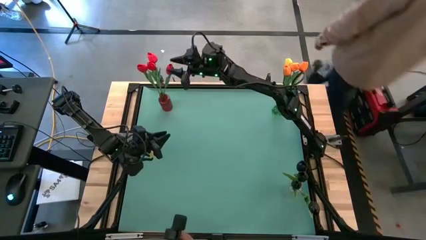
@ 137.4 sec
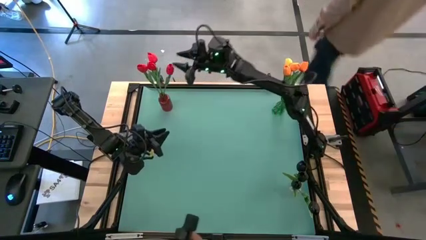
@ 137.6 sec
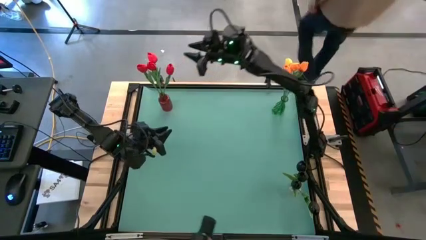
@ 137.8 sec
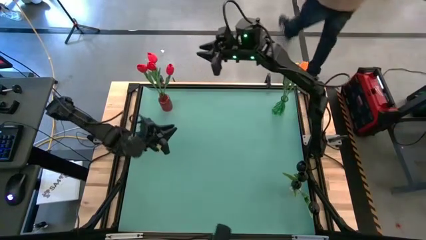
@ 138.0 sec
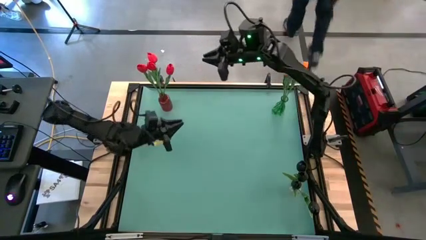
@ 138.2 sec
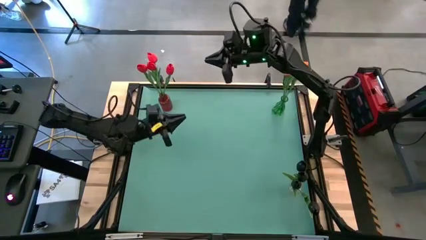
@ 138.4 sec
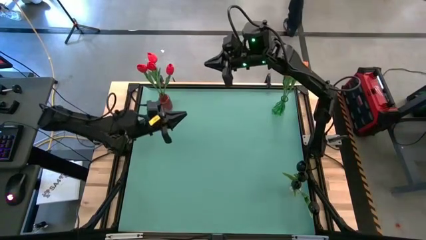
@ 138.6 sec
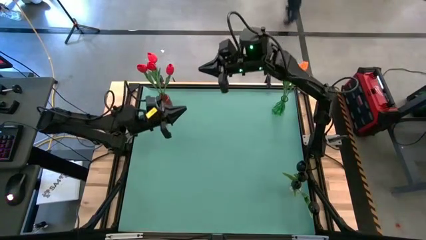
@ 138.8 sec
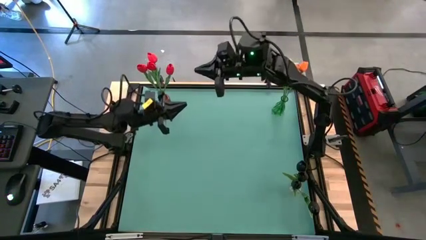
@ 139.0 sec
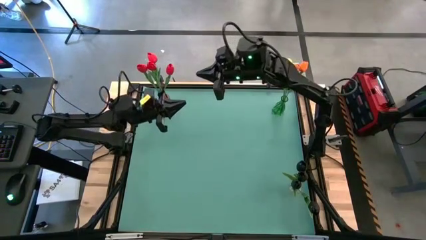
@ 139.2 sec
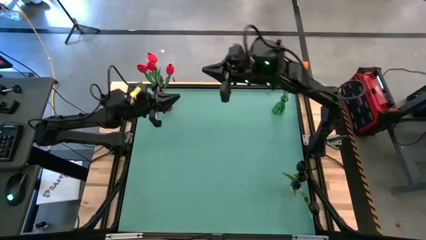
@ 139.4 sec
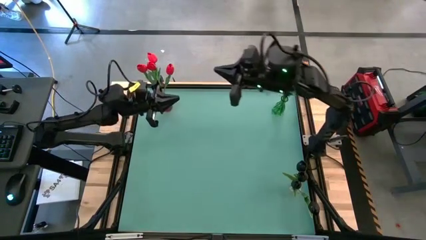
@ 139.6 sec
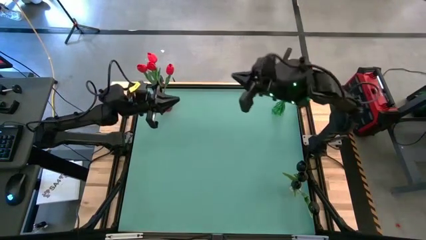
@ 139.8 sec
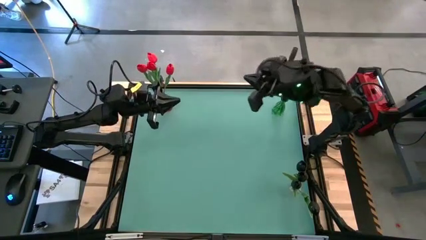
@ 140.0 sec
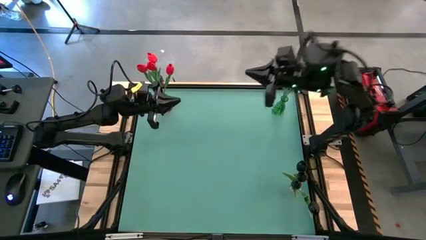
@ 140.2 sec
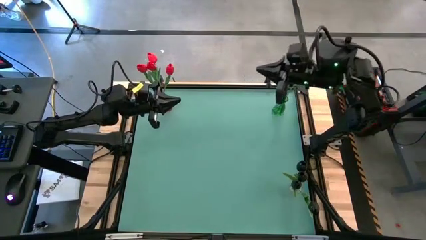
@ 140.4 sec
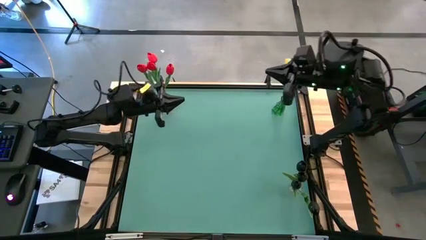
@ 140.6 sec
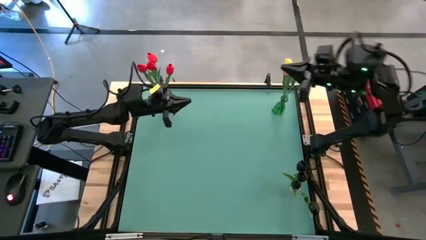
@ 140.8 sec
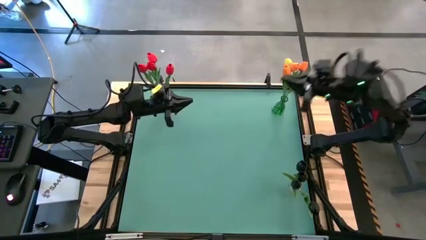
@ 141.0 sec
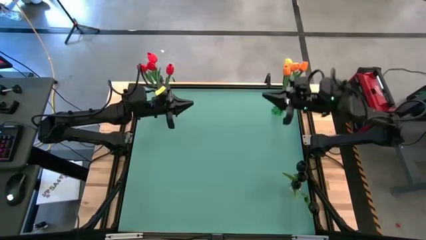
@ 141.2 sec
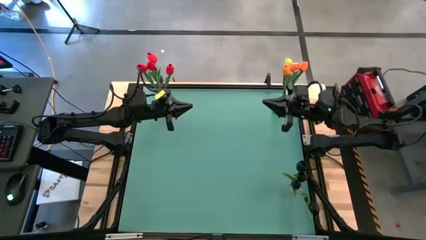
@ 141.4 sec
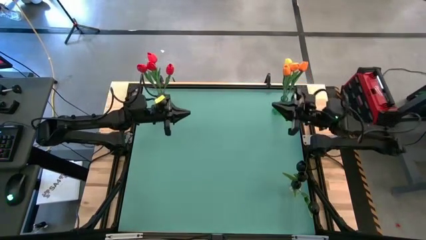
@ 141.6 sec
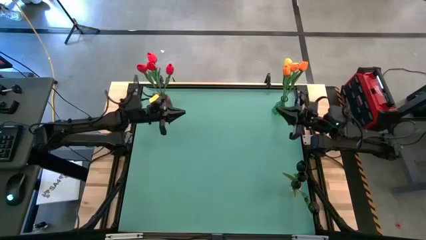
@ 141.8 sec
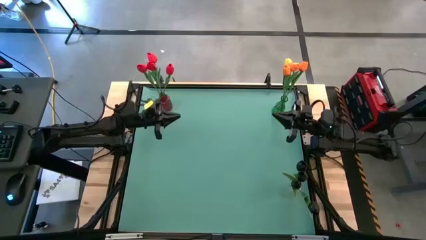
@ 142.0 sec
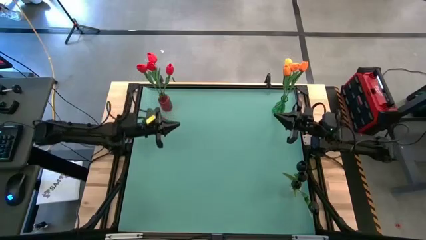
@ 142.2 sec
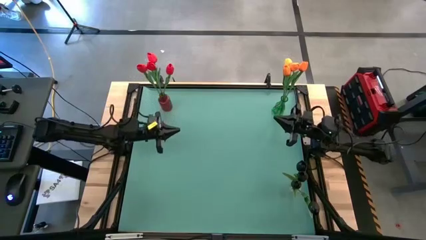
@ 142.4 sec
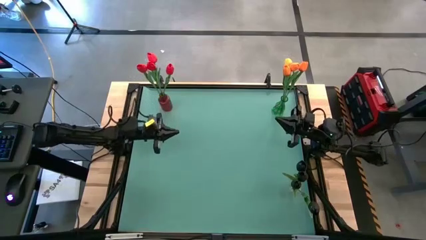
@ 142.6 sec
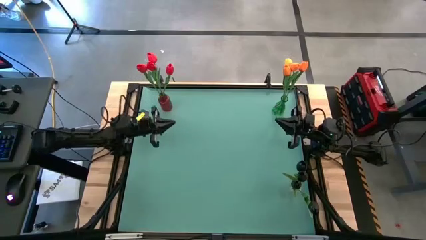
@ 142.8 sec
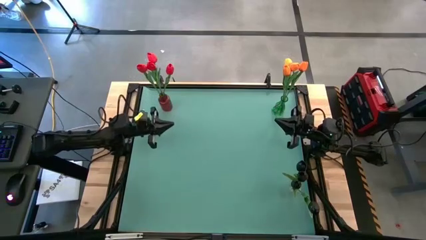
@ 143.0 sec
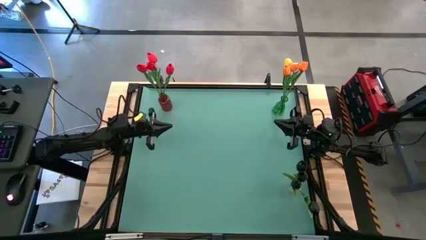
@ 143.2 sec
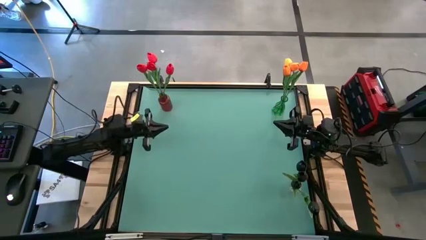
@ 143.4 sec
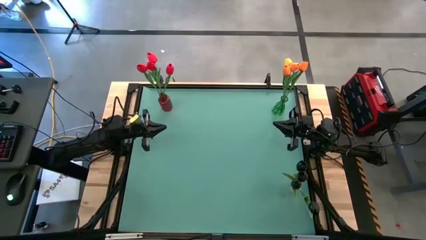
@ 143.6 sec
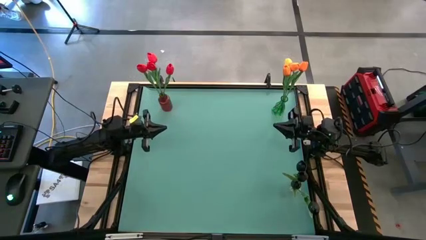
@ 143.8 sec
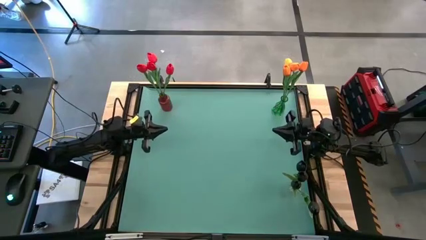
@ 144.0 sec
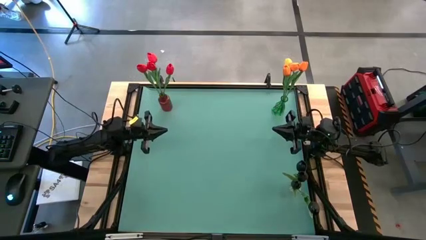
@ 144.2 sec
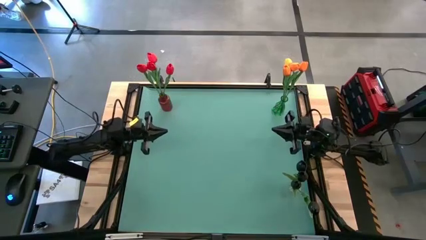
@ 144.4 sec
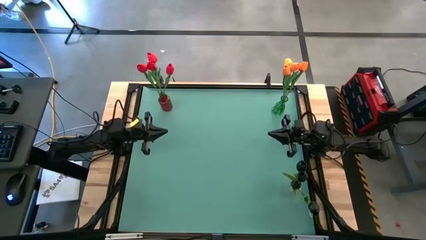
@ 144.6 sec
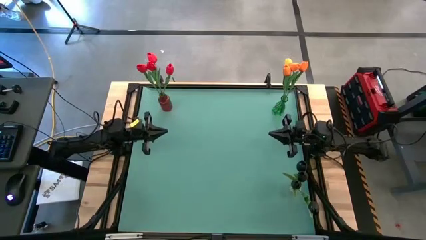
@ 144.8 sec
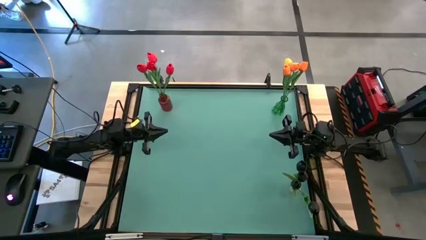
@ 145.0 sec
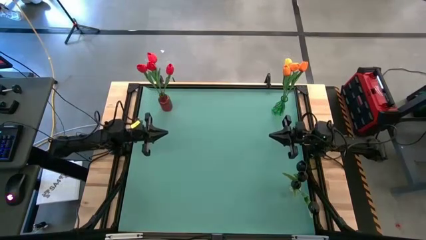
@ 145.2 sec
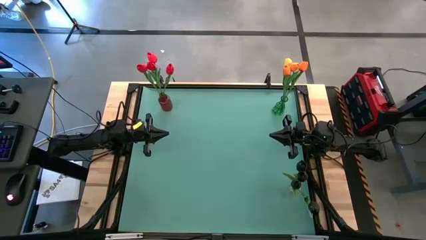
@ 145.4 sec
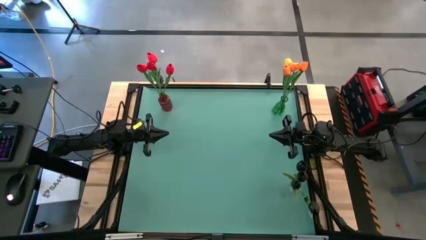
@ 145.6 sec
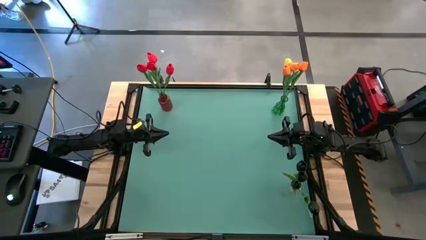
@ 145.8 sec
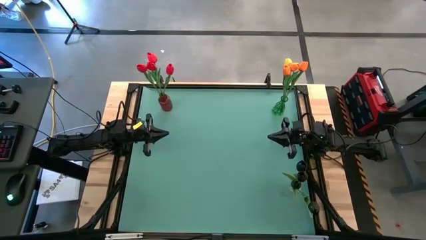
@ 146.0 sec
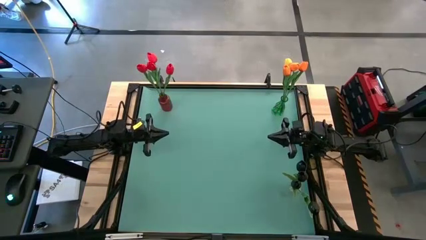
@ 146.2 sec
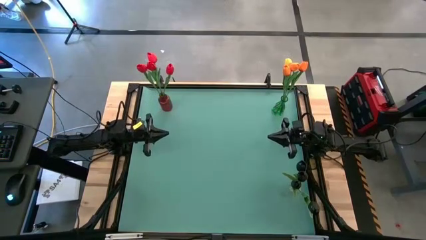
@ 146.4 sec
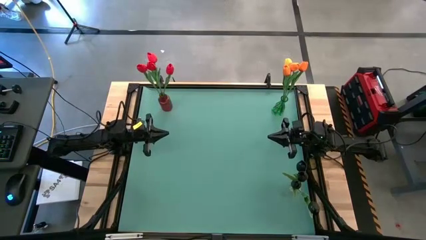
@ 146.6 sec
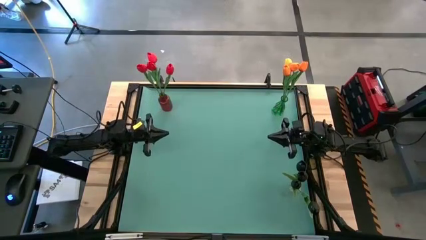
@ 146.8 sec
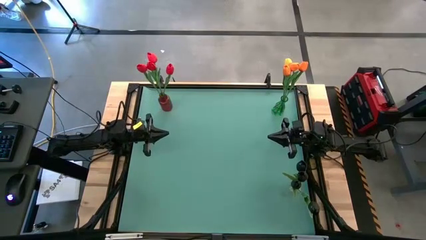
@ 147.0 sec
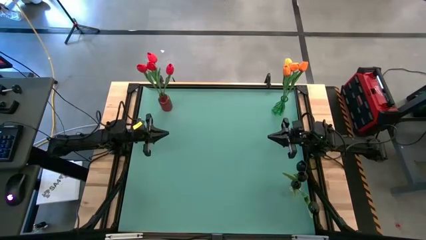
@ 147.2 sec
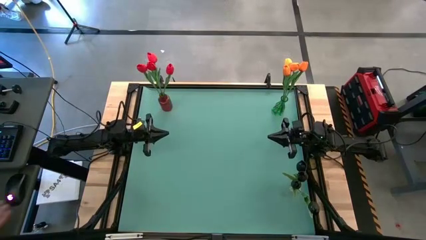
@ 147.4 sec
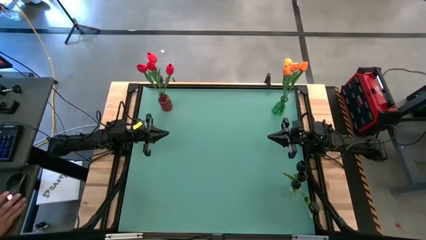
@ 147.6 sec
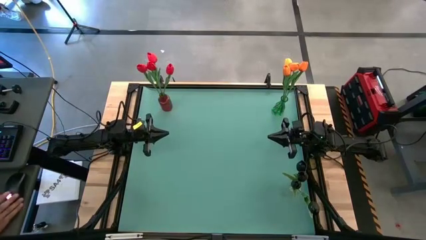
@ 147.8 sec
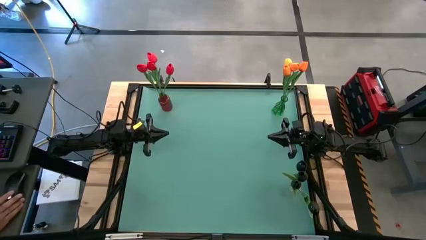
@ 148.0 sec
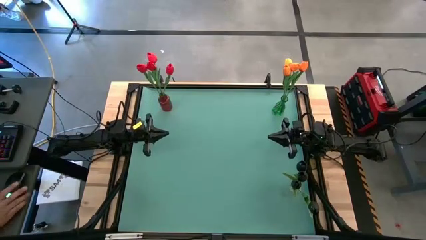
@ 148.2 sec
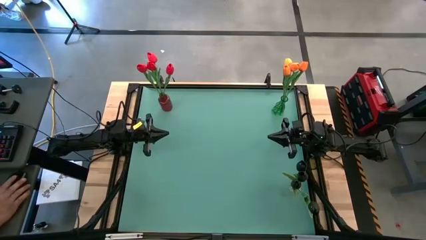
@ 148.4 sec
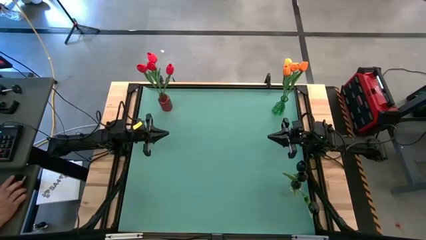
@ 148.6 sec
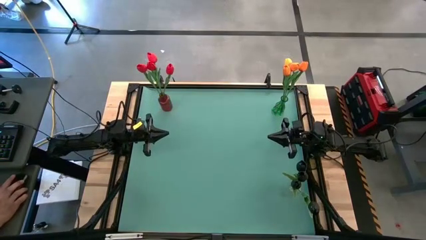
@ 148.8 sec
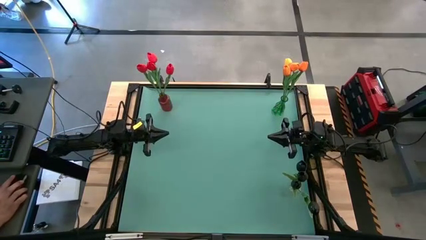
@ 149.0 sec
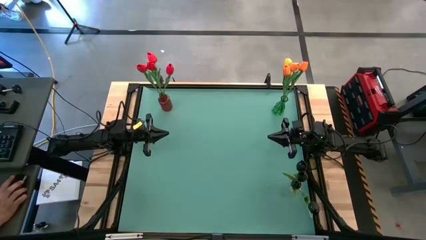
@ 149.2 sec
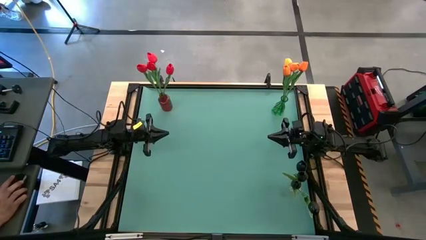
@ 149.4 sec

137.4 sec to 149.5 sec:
Task: Sort flowers into vase by color
Return to Home Position

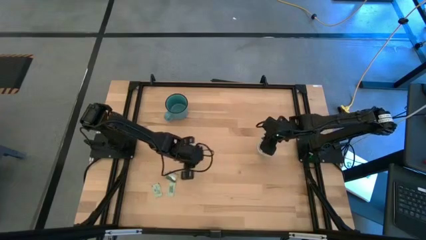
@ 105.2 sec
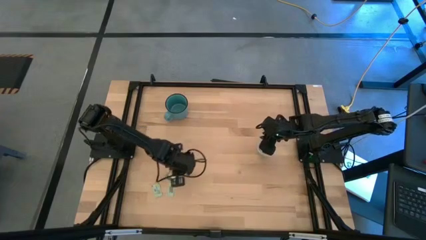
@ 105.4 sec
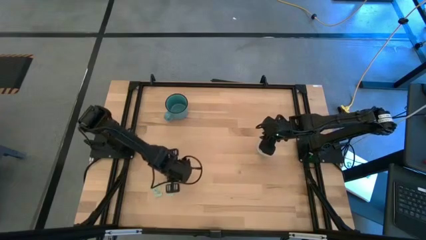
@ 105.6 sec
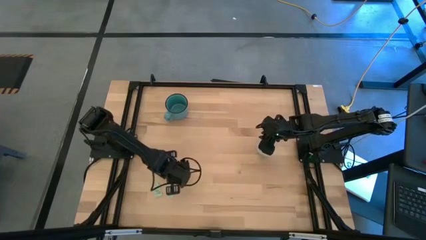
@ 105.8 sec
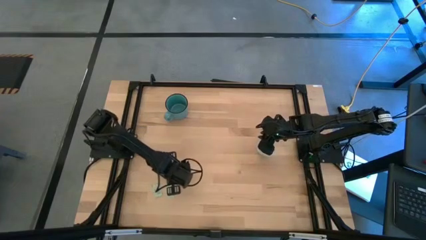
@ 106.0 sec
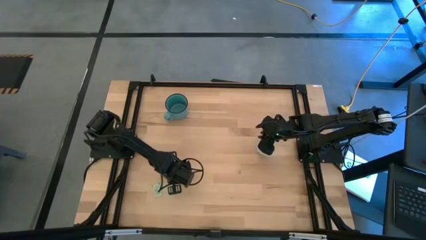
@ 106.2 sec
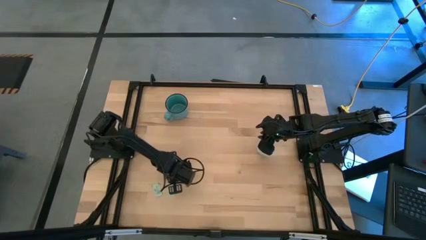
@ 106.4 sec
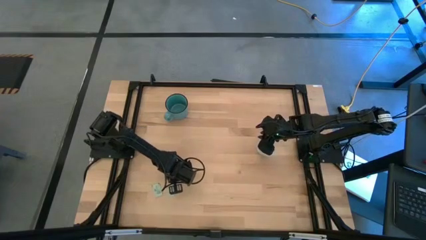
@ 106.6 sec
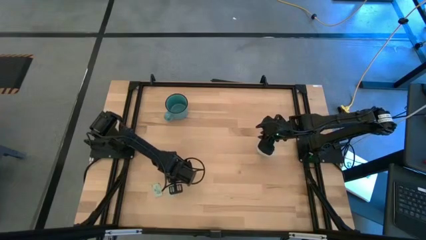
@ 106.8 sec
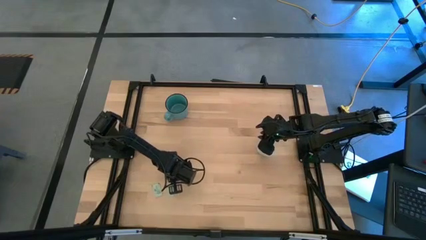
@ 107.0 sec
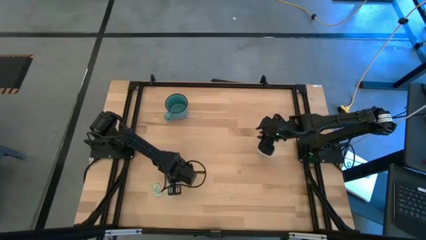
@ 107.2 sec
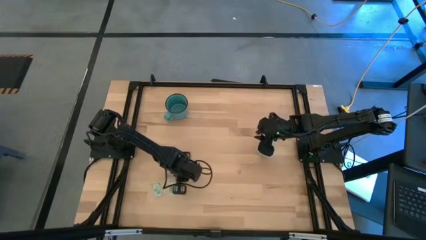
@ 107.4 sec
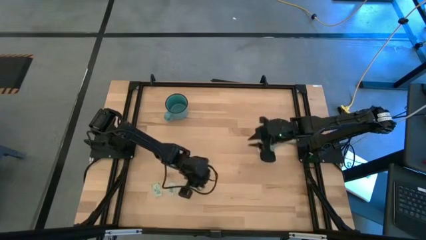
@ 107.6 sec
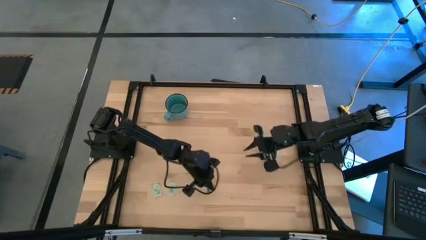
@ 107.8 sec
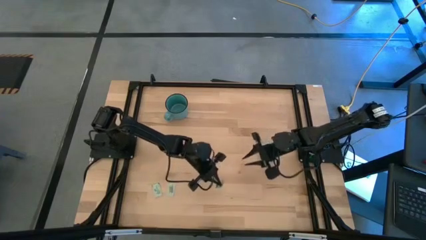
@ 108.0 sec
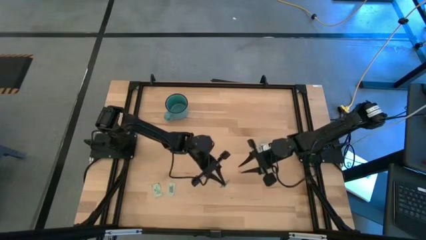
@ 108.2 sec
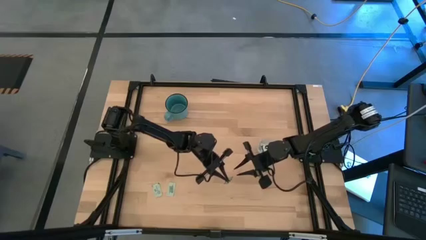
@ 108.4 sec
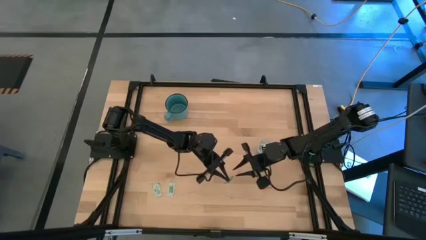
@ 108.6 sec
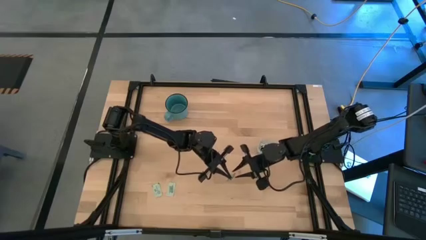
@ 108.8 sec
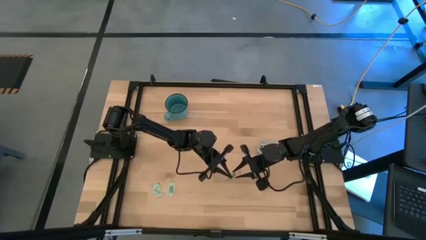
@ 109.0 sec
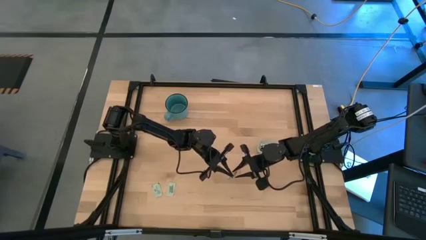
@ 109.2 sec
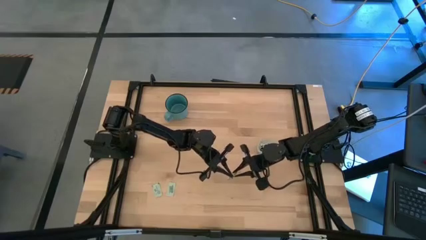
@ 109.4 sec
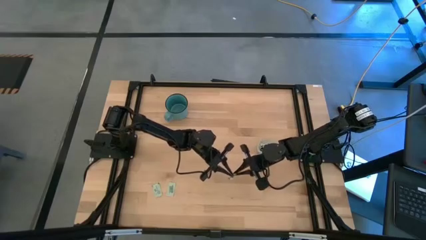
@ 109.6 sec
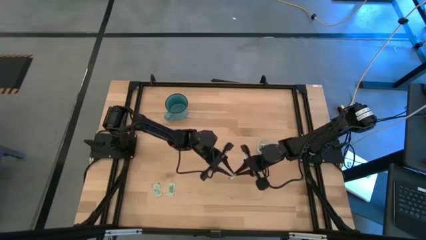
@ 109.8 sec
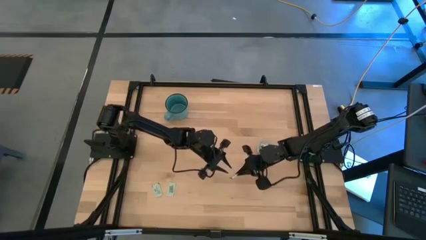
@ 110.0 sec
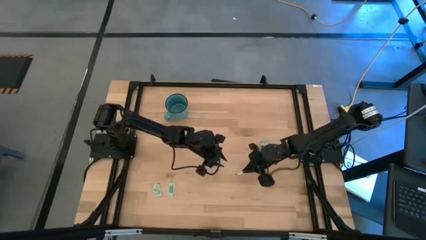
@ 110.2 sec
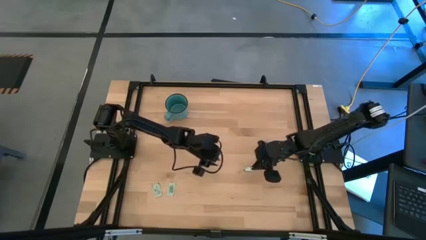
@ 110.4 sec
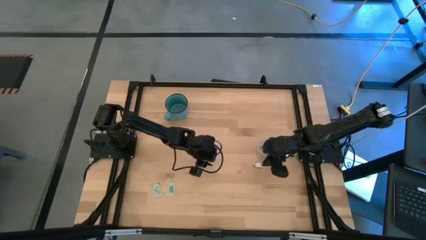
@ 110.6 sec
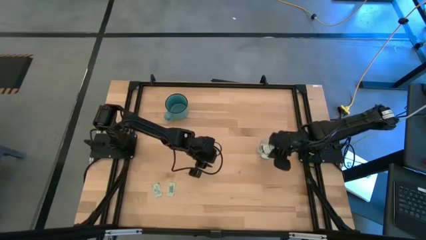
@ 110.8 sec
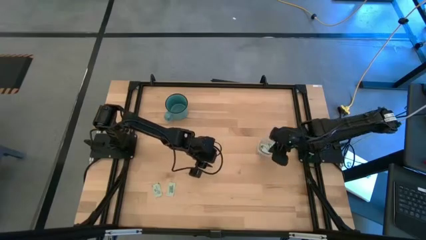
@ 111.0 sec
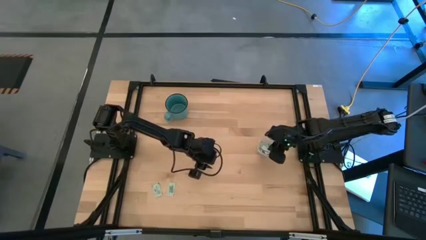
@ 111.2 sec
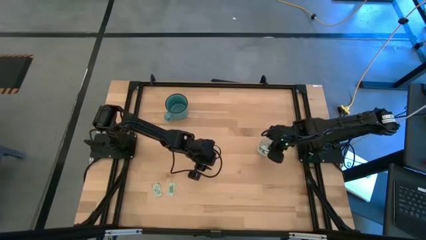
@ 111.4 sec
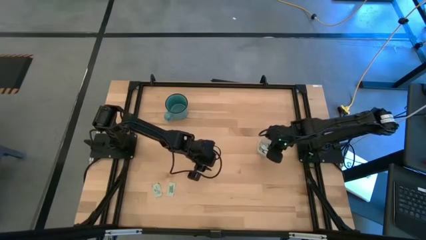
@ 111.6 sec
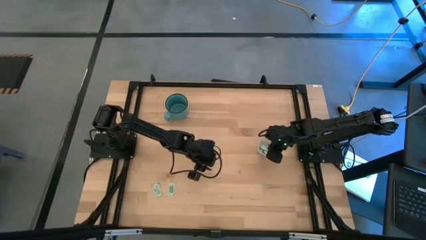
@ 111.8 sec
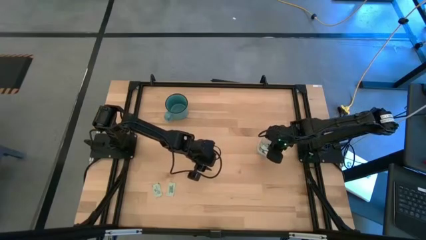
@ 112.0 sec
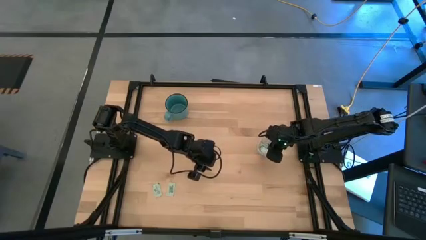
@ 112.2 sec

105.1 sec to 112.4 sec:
Task: Pick and place Stevia / Truvia into bins
Put the truvia packet into the transparent bin
